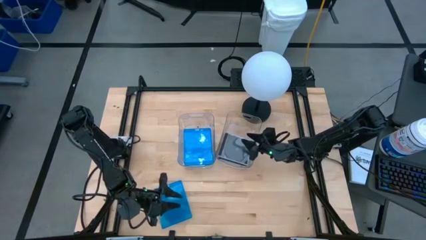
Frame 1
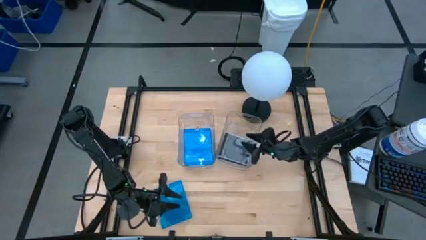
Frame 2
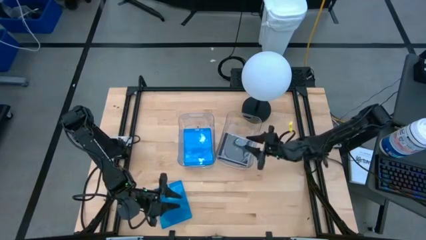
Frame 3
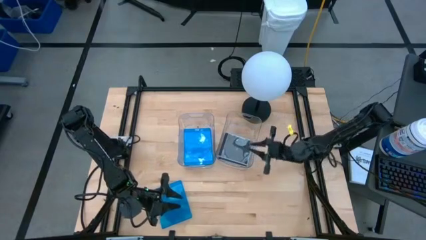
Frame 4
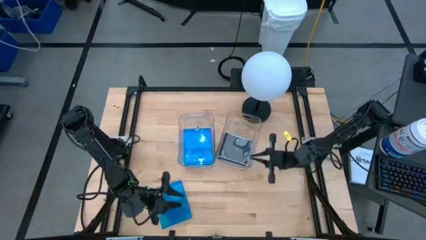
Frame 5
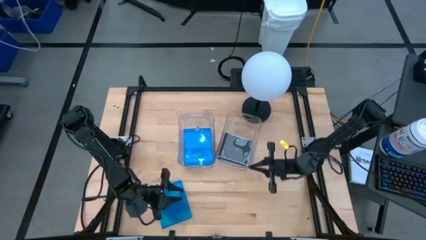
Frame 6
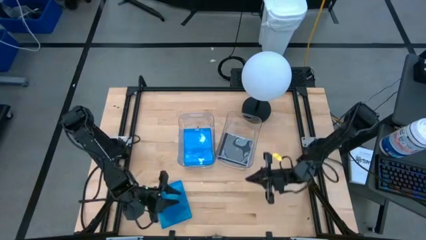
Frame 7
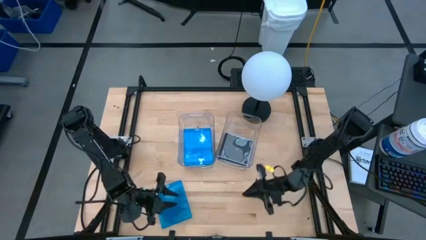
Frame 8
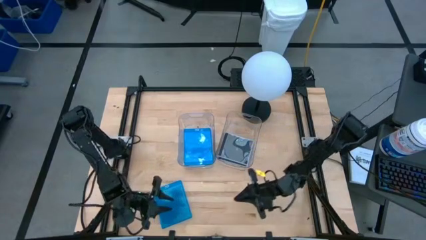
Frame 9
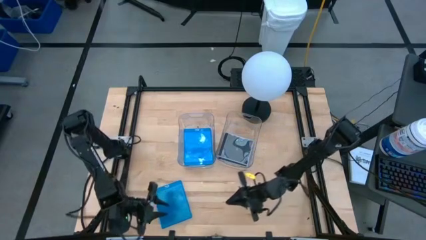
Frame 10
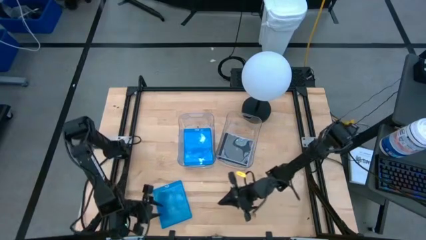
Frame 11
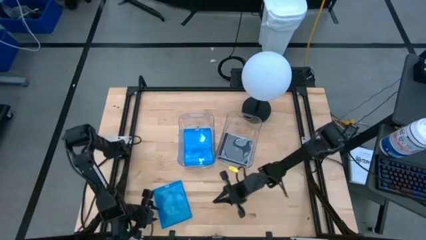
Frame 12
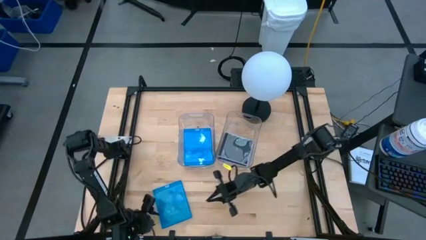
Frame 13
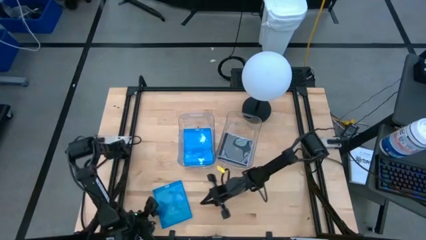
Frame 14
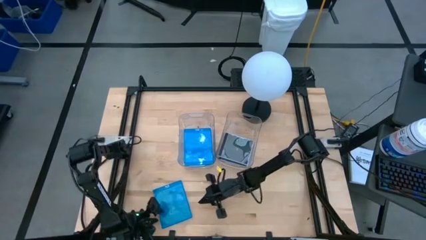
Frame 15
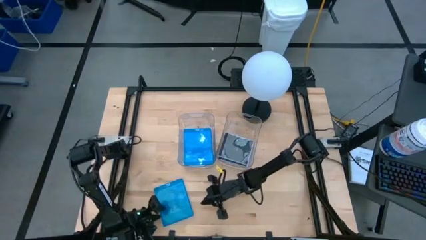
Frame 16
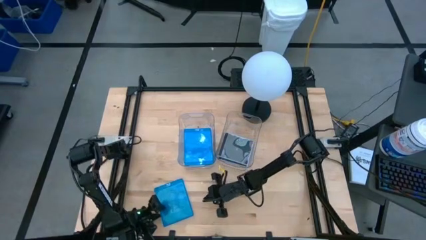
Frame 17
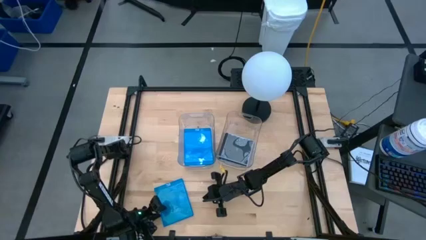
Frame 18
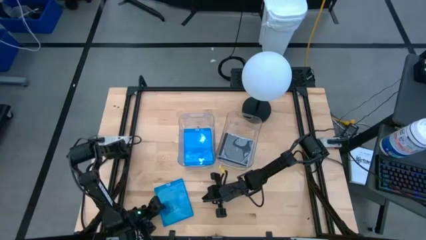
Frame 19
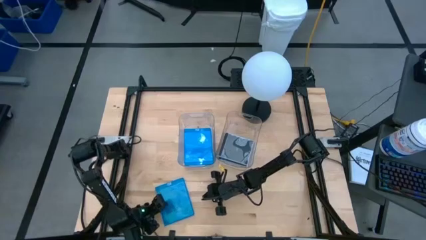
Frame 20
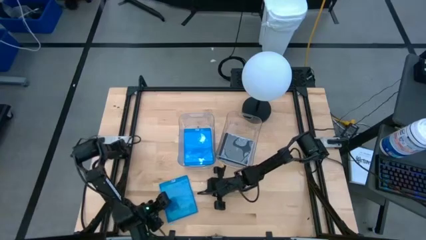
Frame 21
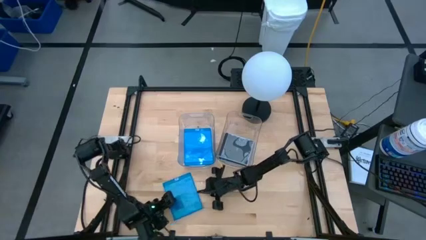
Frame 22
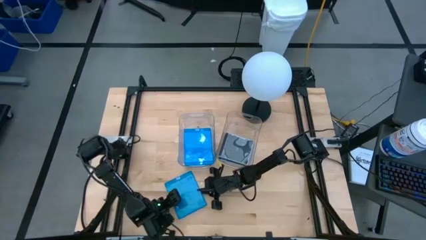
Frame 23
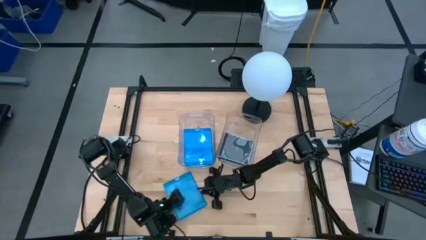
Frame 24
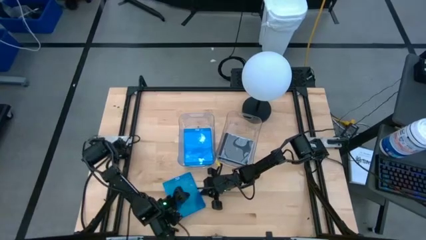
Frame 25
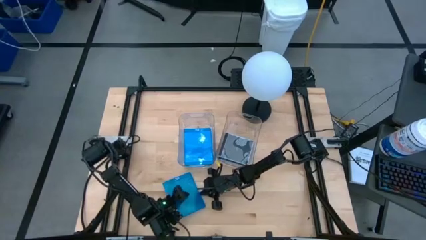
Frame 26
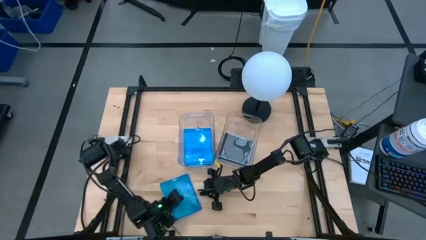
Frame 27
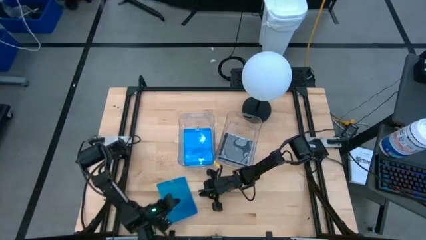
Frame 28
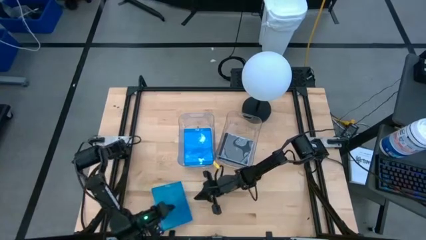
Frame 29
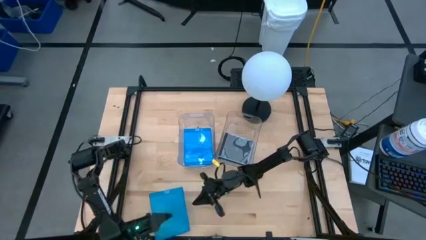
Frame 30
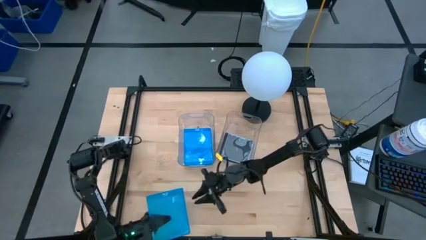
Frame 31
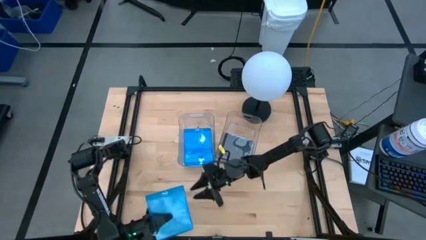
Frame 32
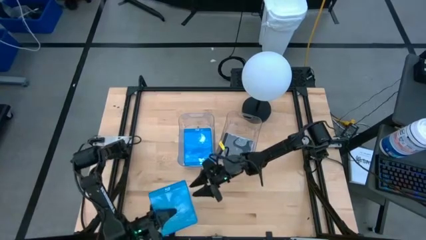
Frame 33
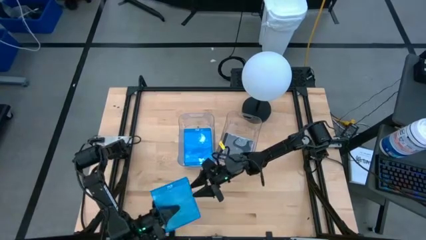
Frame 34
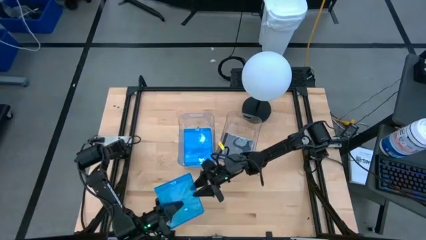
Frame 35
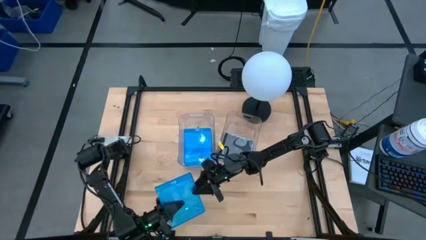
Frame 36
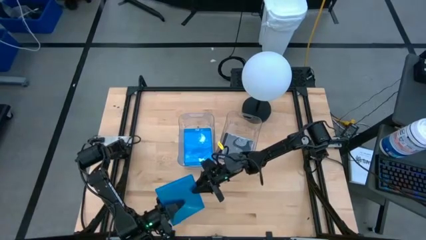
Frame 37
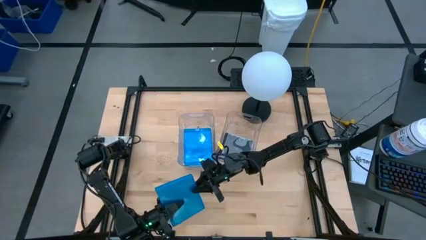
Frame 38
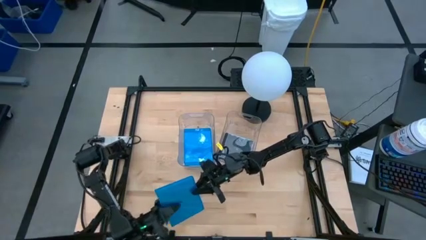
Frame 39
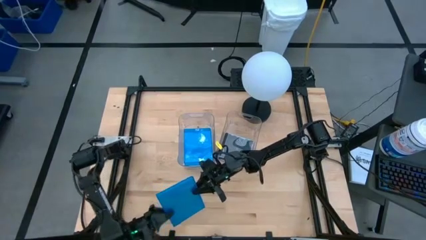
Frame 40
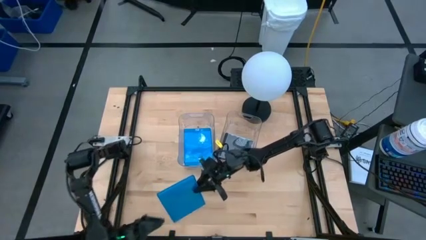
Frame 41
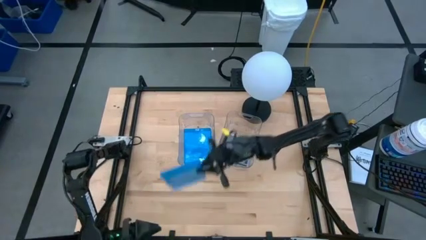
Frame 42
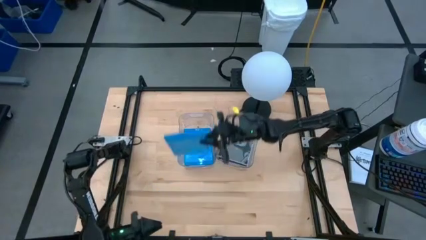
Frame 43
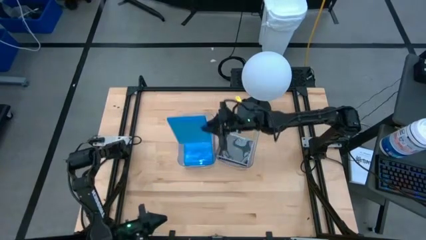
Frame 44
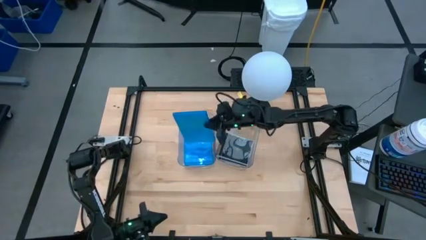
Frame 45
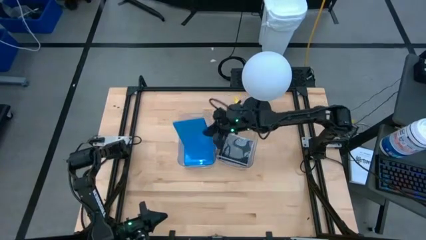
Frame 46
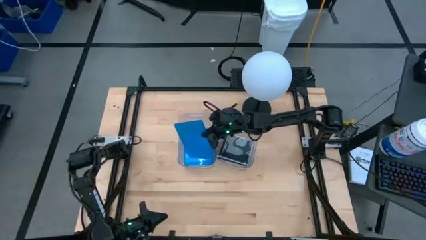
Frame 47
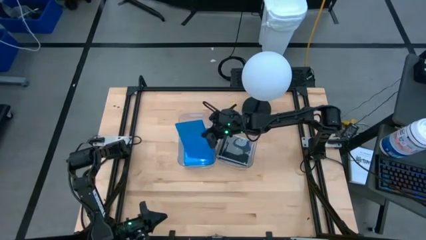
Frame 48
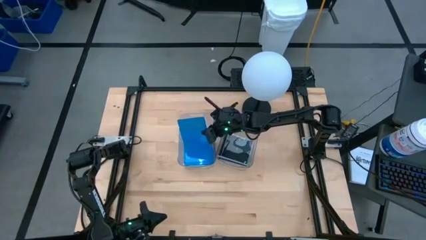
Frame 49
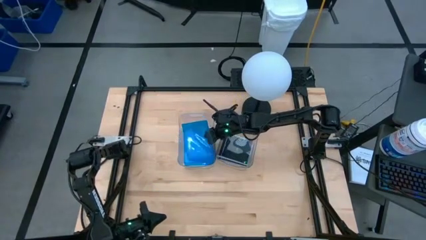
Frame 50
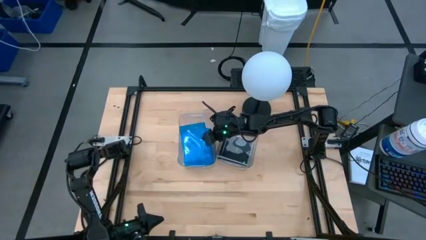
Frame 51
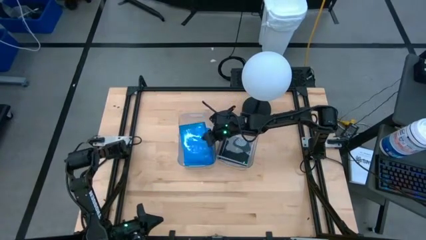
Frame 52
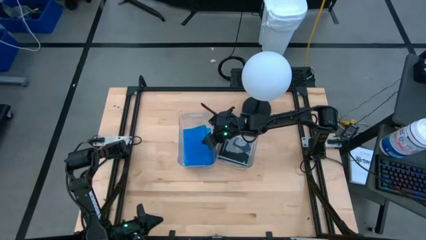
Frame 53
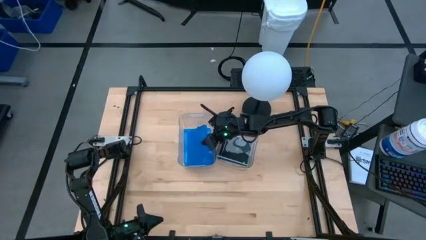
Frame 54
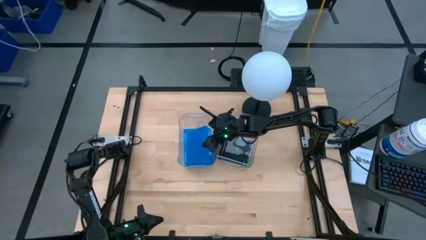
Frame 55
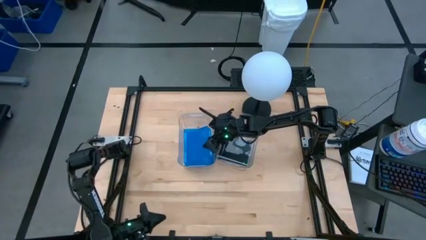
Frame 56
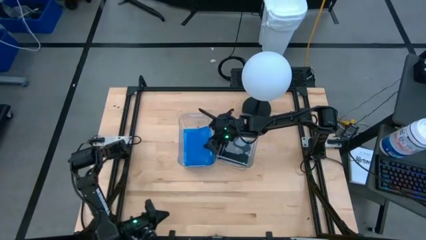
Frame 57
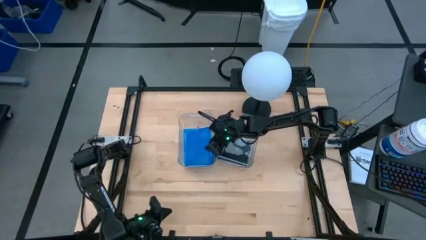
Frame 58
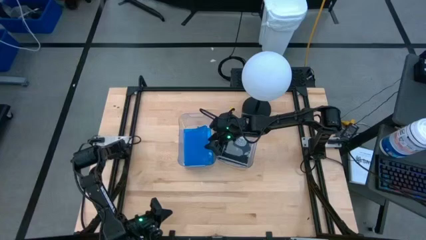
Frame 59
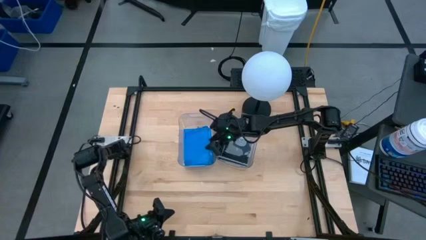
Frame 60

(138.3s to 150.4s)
Task: Pick & place jewel cases by type
Put the blue cd case into the left transparent bin

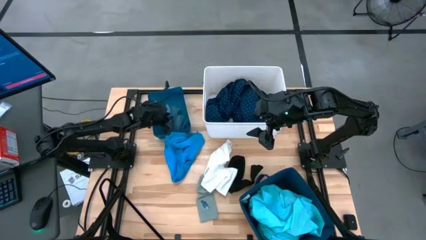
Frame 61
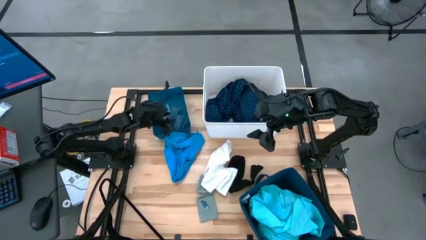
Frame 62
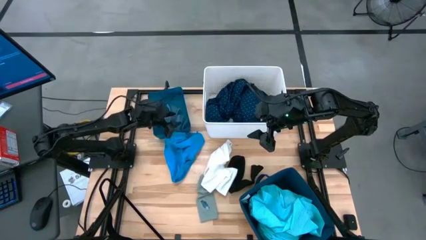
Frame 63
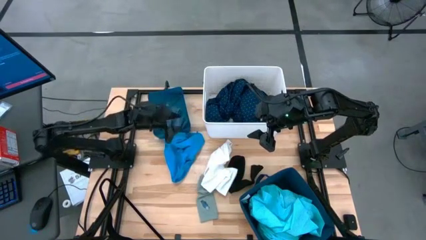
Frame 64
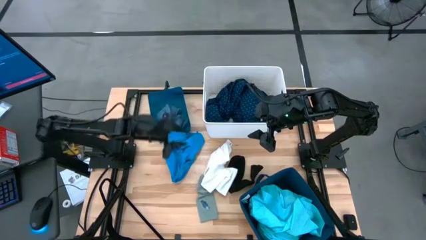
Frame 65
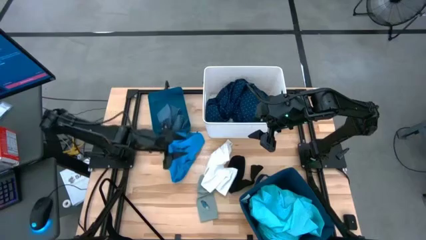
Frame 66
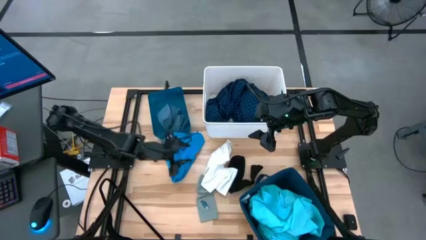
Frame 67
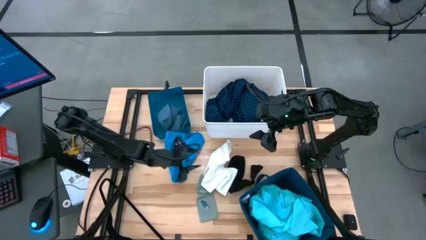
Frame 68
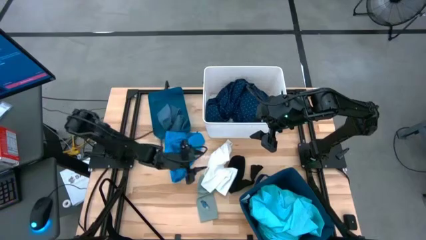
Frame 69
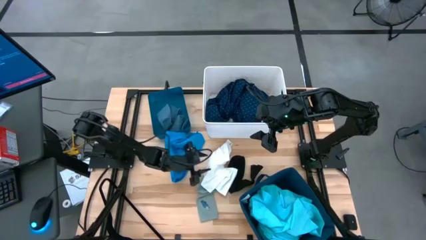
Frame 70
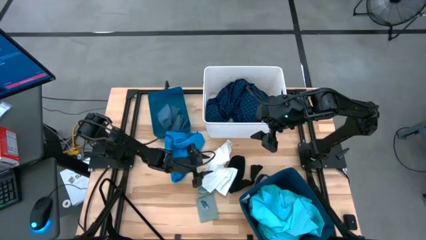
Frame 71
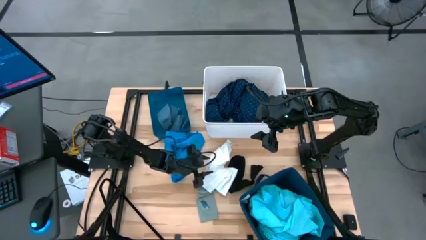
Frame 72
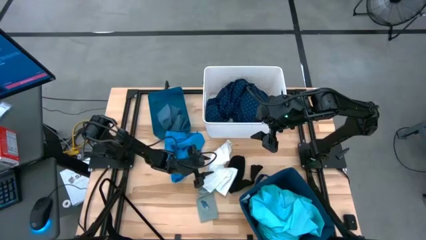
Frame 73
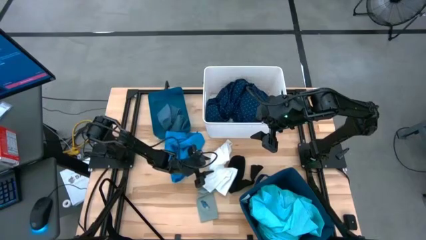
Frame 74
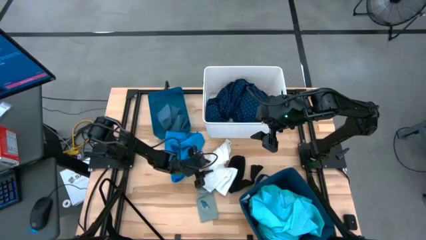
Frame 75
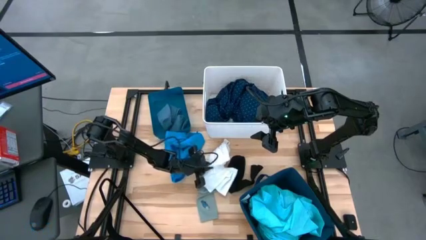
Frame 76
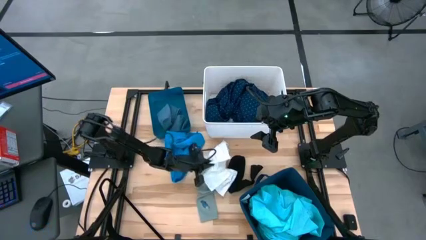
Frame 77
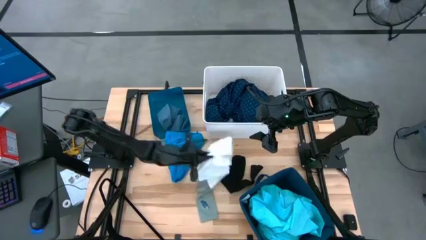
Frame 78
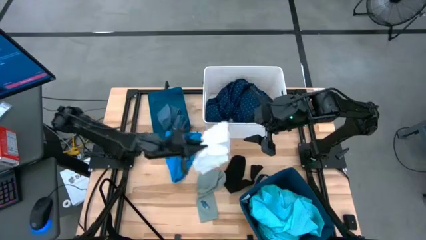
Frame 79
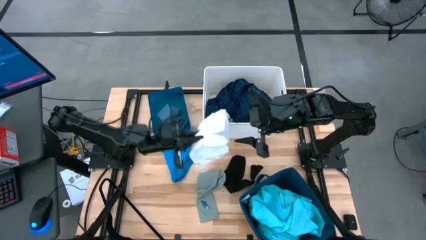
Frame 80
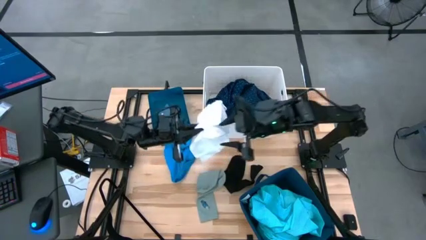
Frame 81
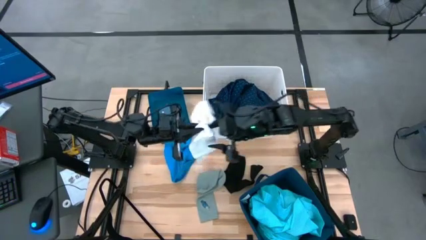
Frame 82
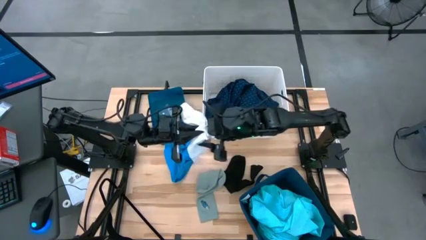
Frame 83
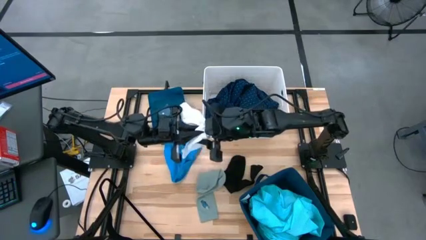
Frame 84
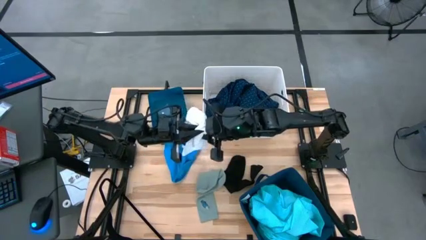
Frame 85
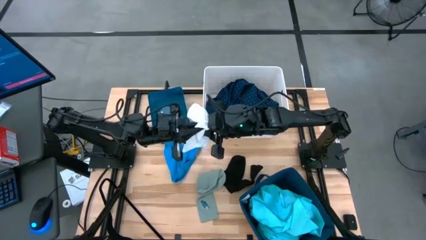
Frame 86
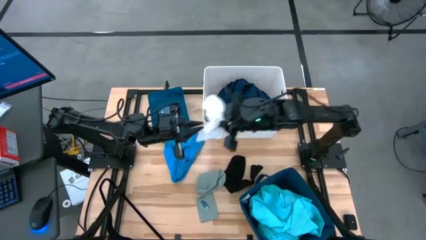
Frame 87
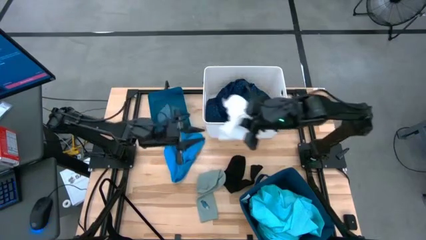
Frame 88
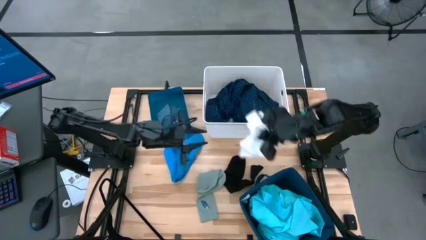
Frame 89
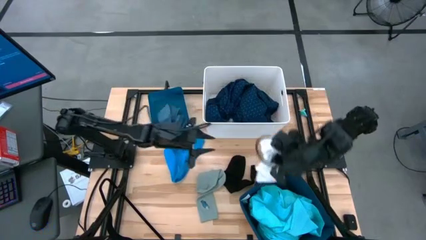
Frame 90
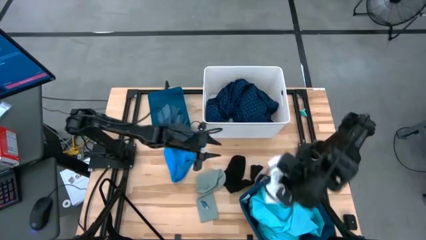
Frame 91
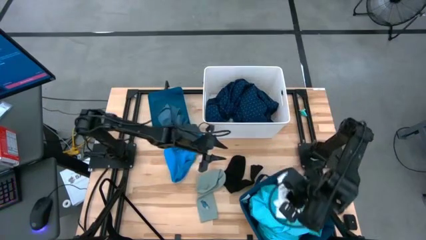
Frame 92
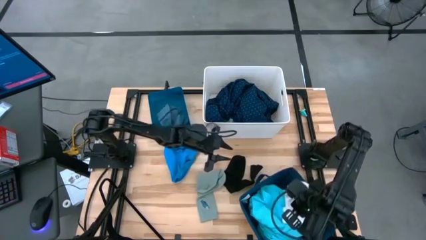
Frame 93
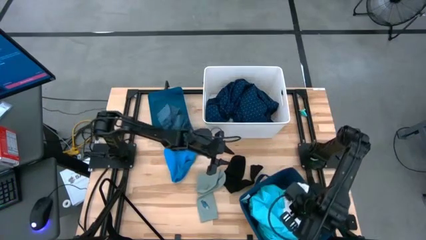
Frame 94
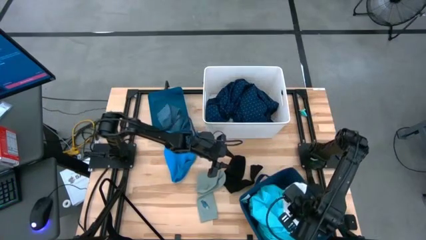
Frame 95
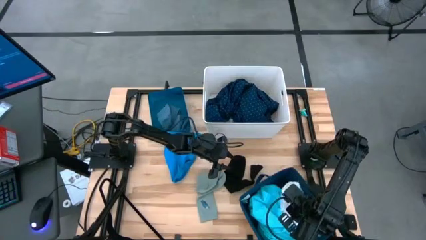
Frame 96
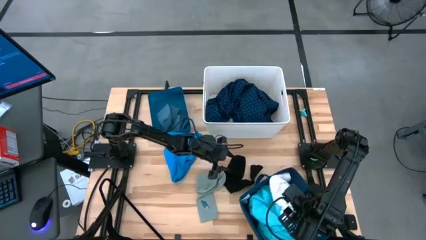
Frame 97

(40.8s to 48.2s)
Task: Pick & Place Cloths
Put the white shorts into the dark blue bin
